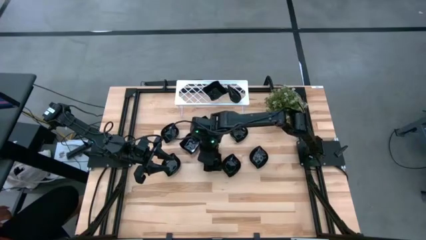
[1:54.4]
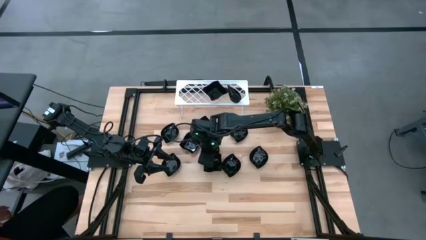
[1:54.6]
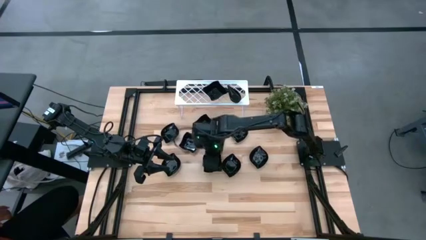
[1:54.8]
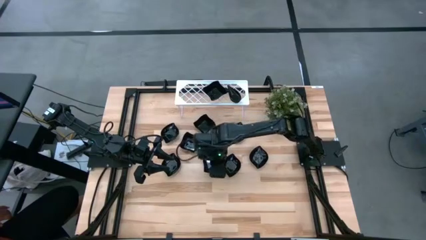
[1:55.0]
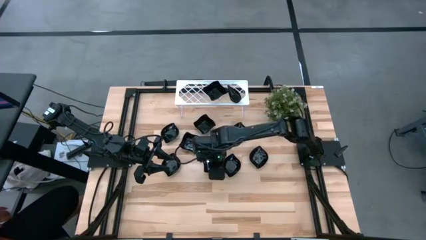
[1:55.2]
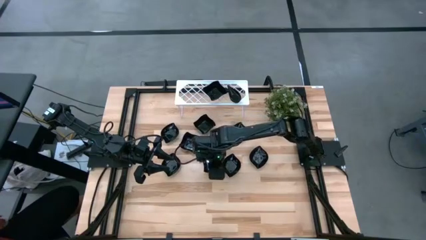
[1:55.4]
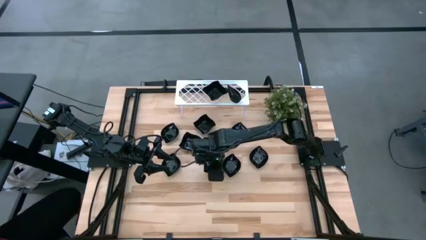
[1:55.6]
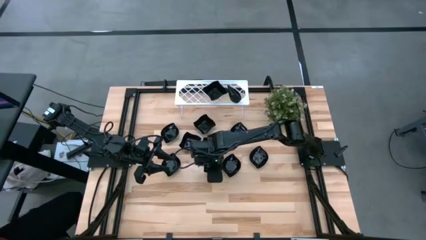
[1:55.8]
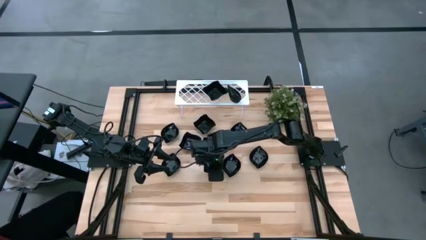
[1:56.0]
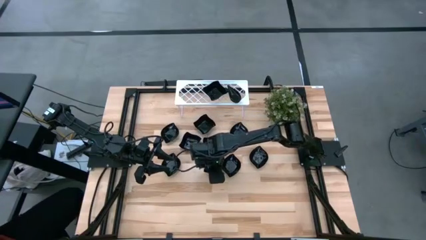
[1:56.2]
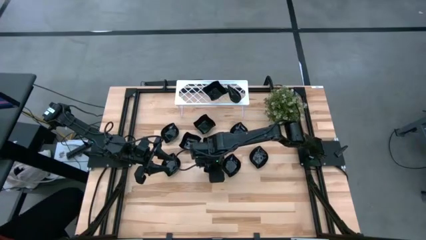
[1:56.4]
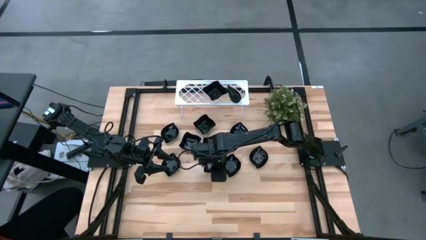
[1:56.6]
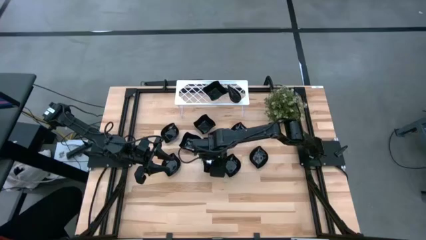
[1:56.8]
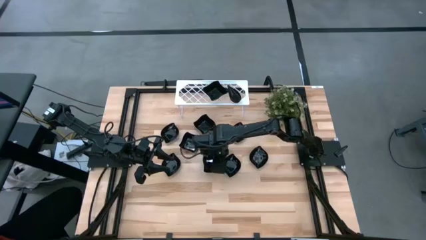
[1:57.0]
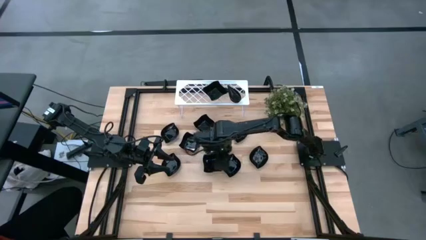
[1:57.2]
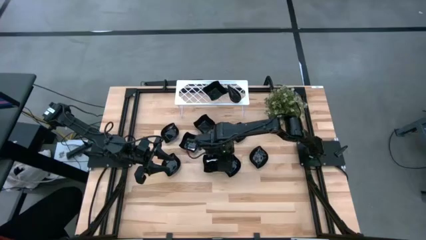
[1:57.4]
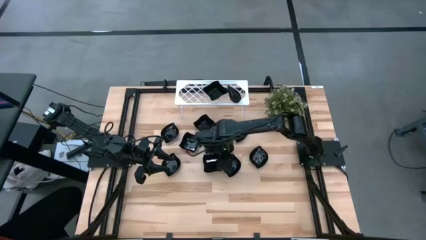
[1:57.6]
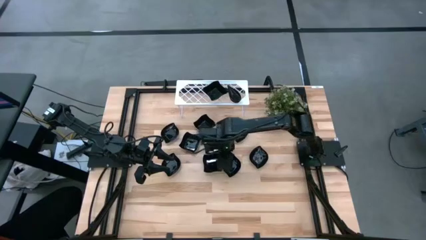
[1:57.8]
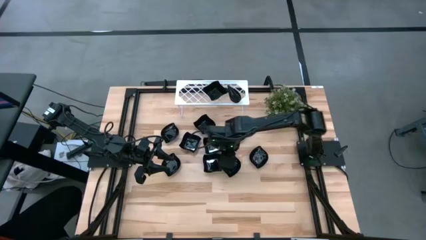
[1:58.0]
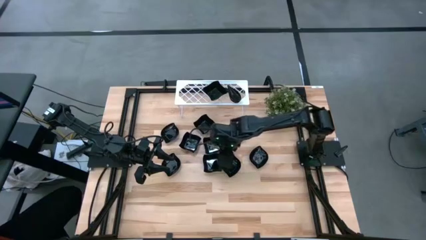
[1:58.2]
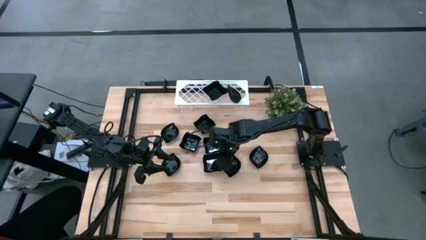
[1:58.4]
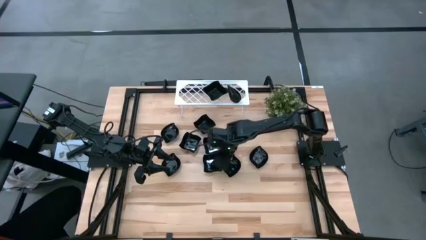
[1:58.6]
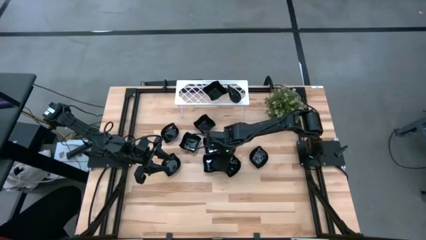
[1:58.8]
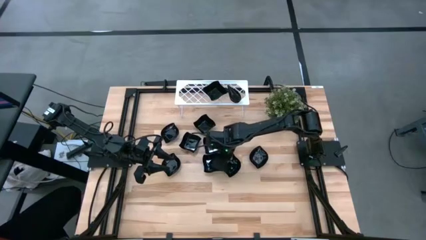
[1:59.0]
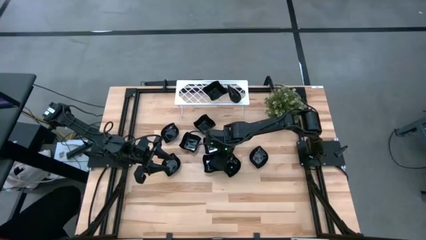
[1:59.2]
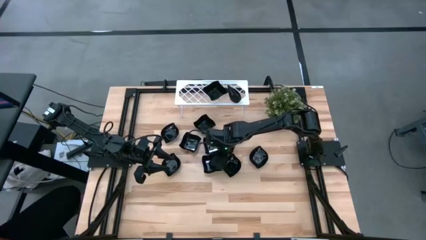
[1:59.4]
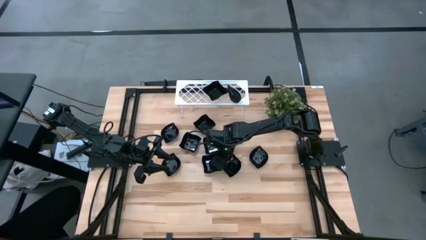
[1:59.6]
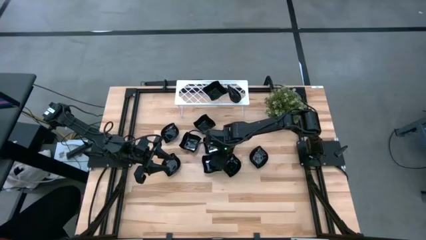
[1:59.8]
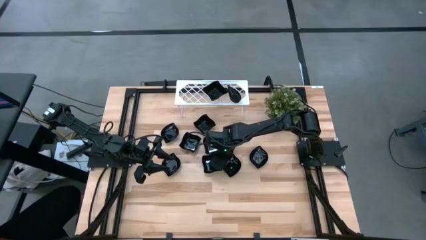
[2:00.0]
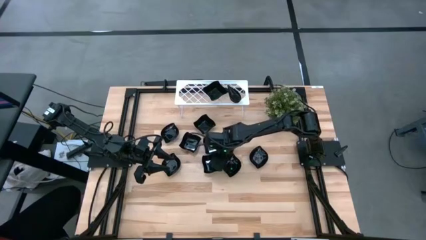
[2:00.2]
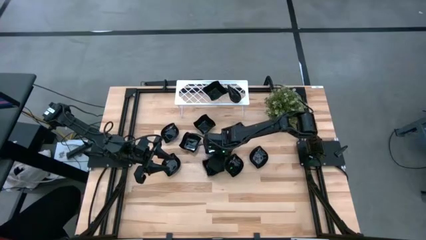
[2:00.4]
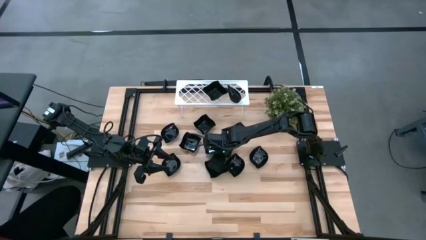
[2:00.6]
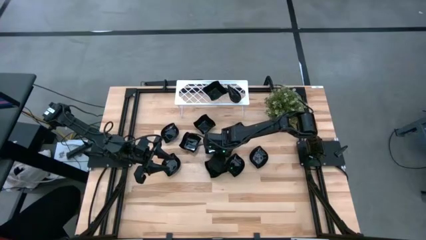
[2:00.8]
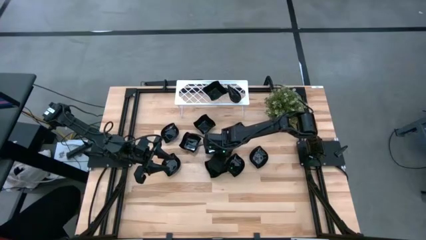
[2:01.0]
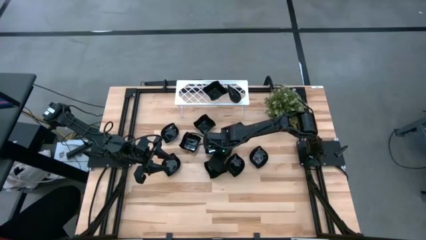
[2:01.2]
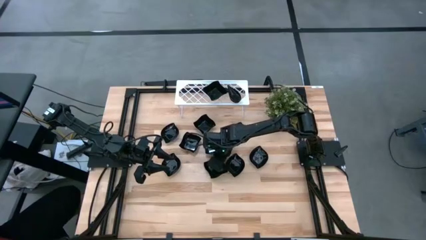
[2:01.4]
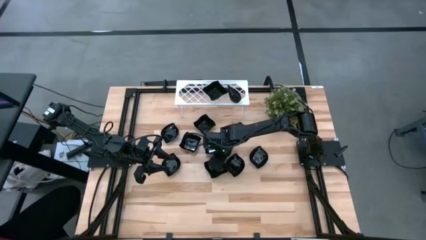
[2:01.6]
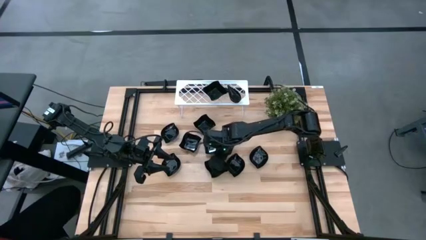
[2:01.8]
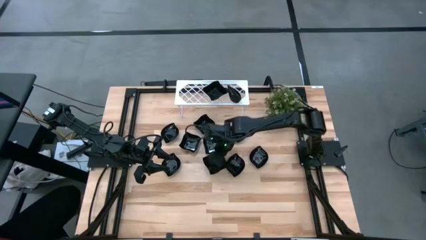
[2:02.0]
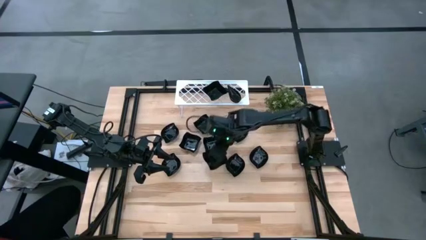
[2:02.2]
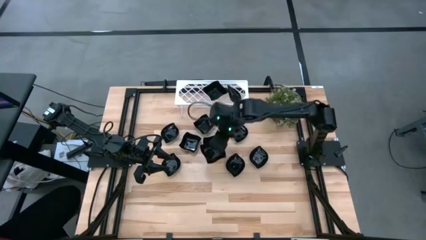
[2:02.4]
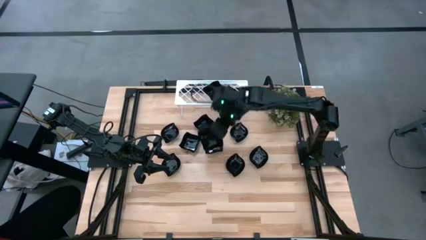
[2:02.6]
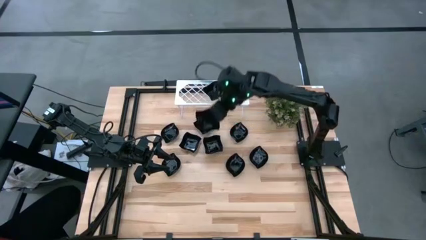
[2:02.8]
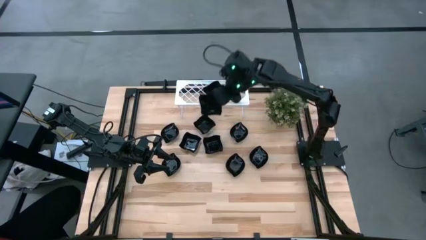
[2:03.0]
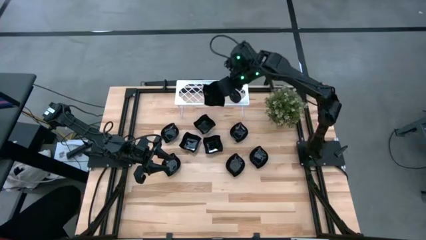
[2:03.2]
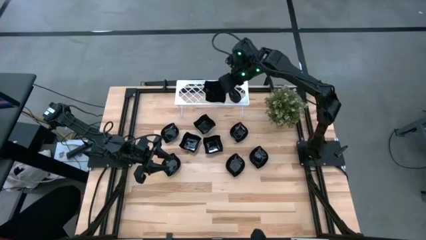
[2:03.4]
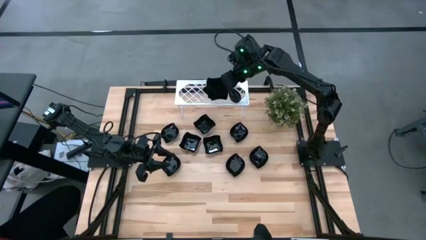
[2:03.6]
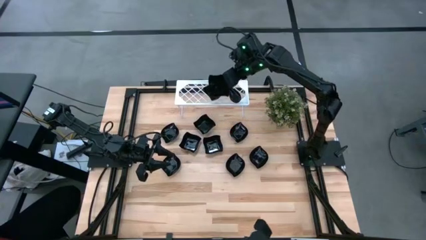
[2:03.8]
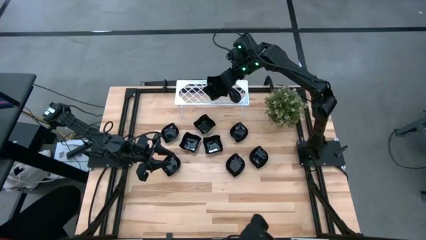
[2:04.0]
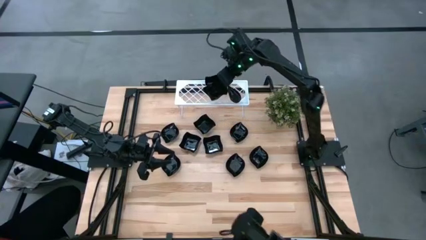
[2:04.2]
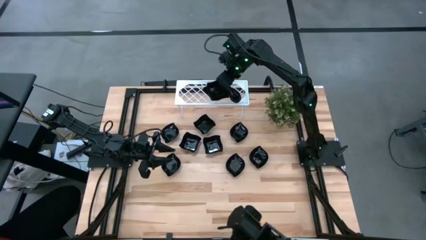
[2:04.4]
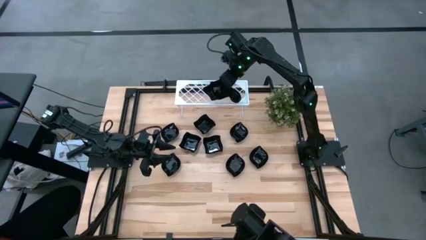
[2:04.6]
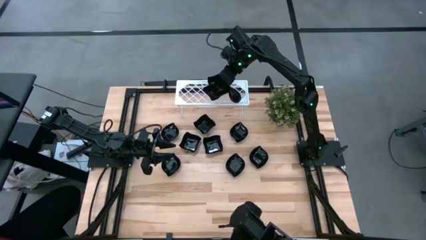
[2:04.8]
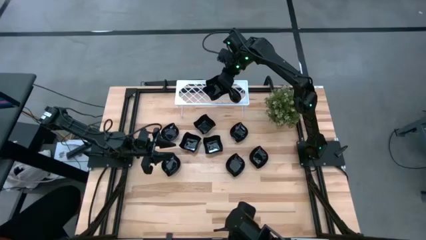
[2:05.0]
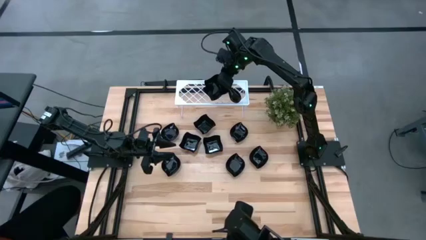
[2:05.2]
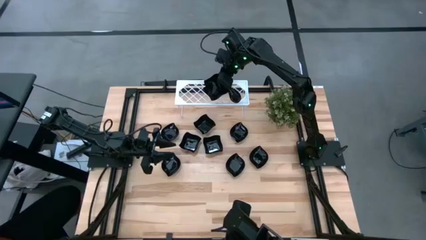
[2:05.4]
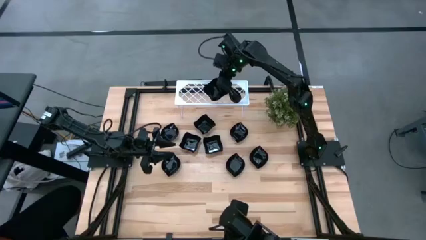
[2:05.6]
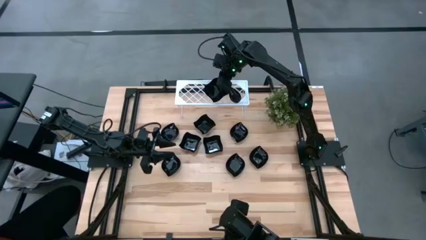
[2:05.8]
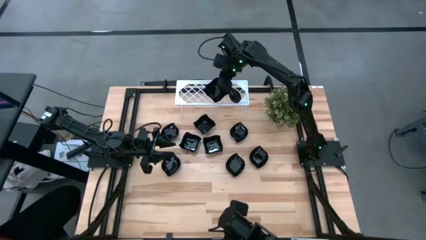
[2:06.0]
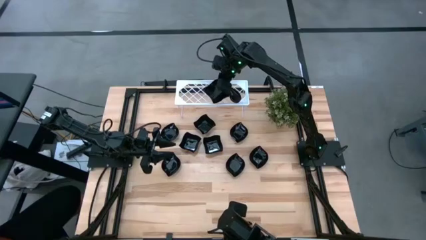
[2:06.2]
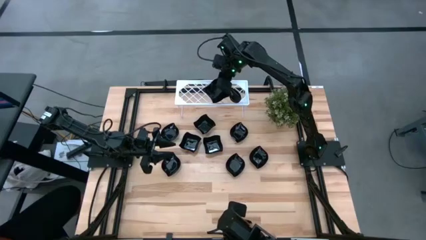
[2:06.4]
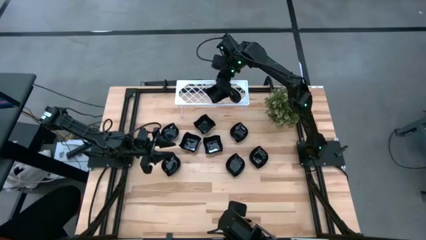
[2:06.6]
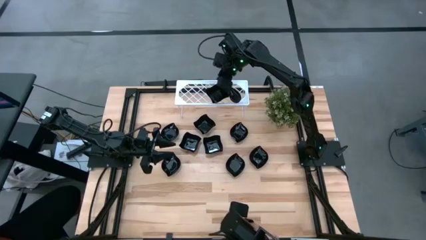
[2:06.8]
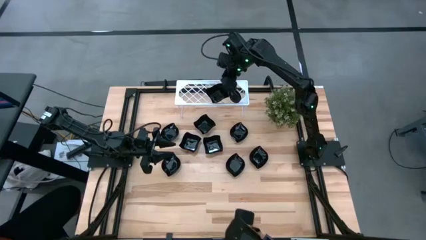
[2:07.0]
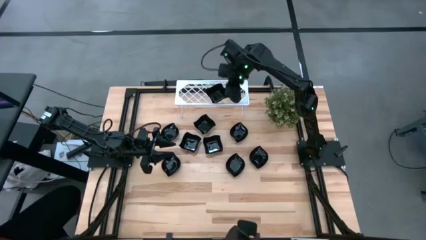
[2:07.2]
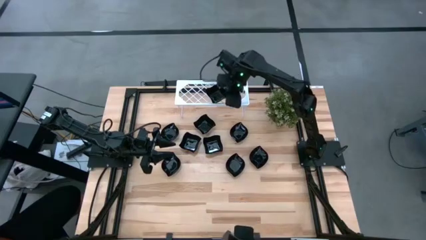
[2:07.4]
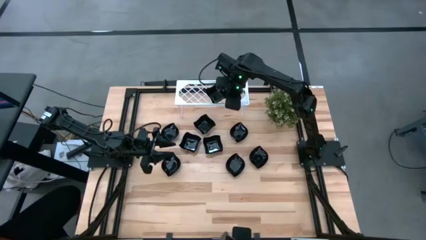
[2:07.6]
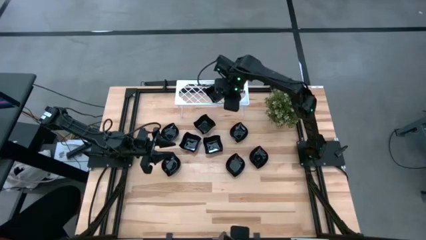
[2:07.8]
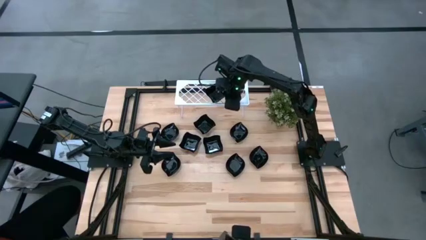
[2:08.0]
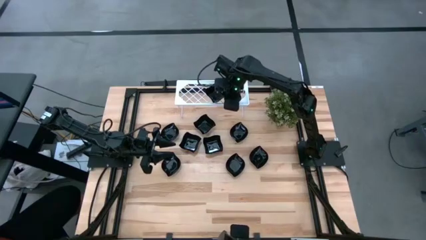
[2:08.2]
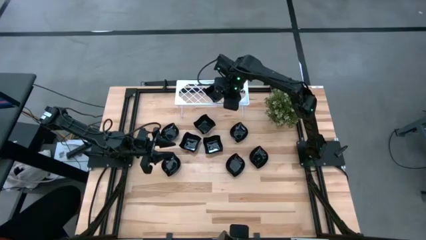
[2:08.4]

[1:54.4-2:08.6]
Task: Pick & Place Mini shaped plates
Stack the distorted square plate on top of the other distorted square plate on the shelf

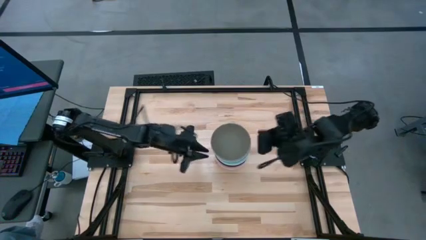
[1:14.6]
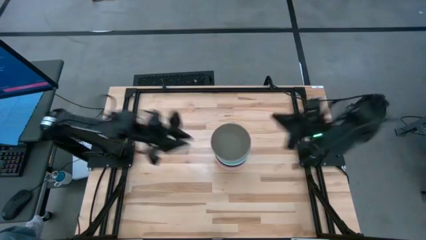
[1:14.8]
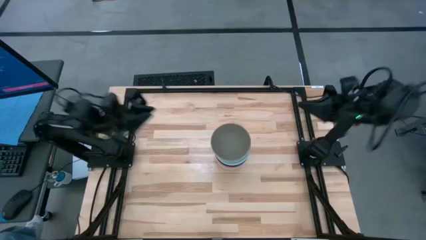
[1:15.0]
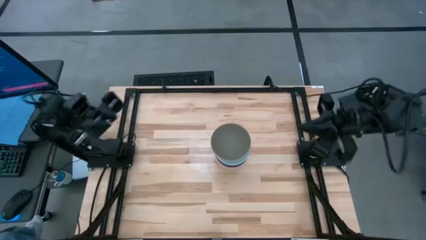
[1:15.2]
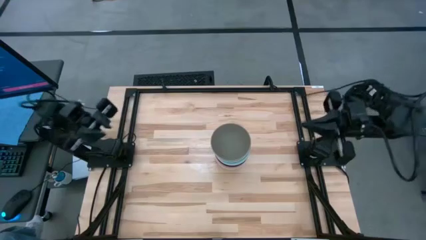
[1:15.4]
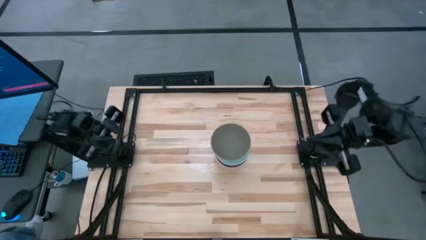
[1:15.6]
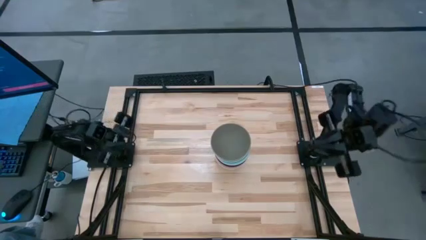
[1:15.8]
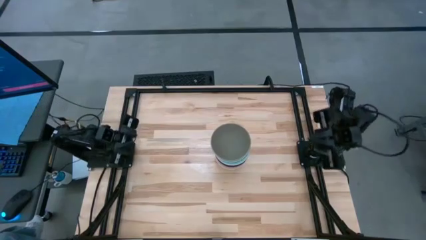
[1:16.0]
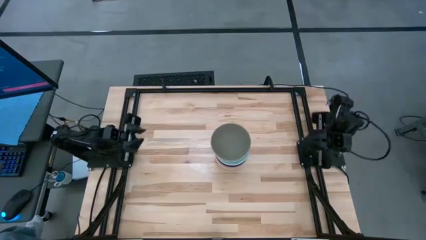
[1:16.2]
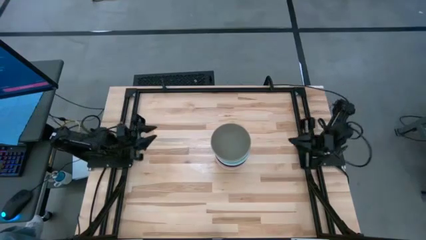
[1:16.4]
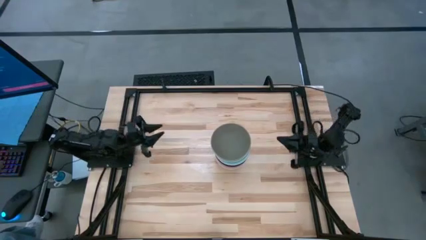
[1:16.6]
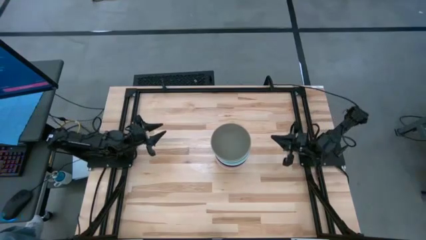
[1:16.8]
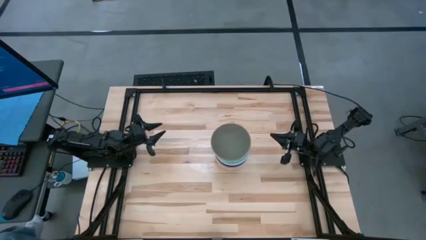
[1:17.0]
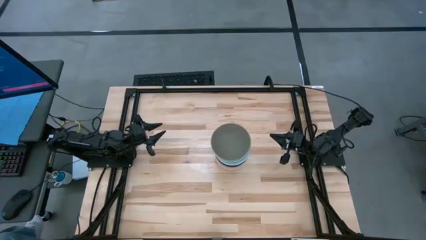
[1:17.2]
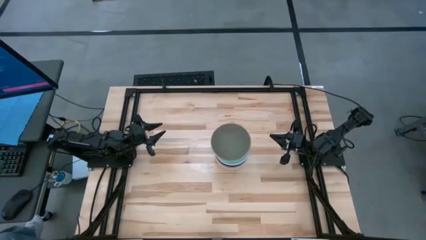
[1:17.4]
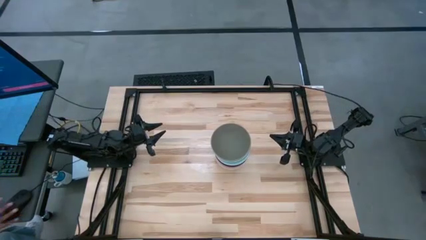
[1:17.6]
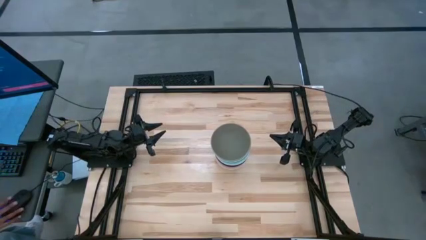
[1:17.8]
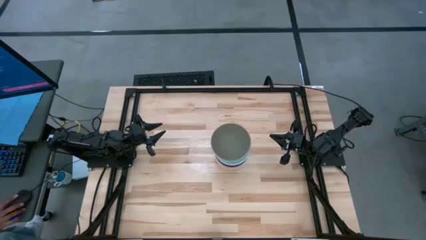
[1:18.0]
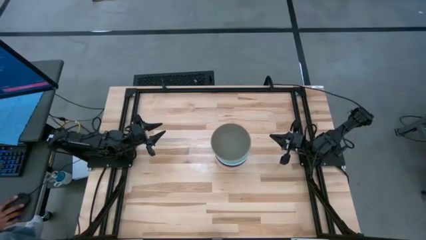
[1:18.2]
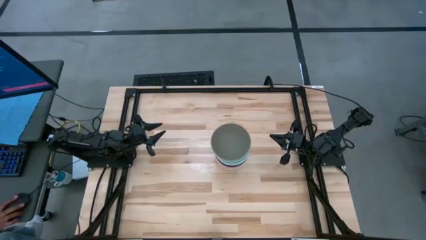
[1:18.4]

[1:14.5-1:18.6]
Task: Nest bowls inside each other
Return to home position
